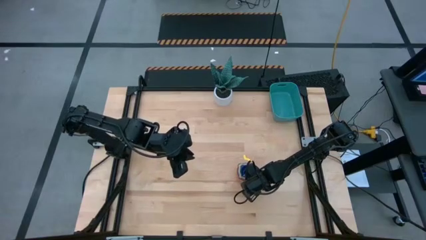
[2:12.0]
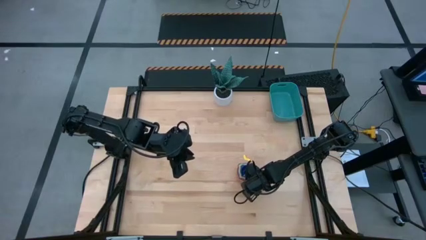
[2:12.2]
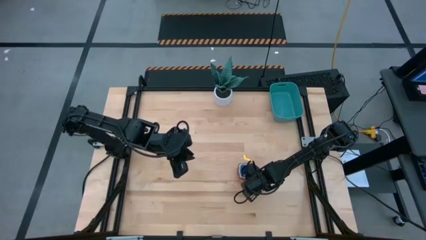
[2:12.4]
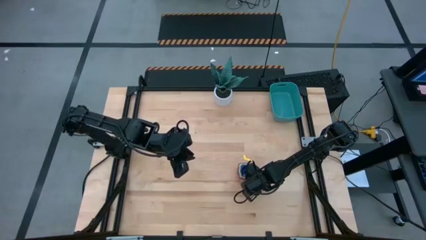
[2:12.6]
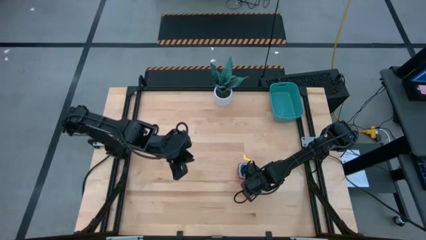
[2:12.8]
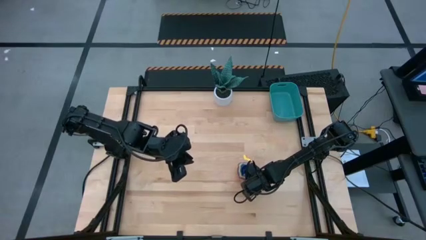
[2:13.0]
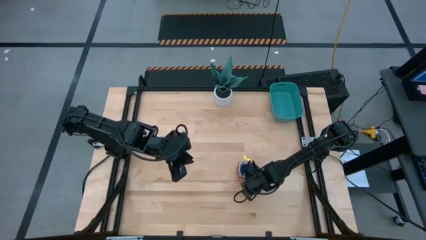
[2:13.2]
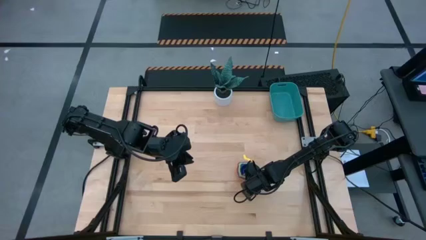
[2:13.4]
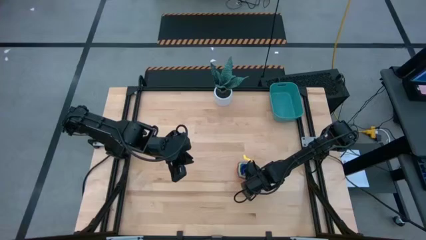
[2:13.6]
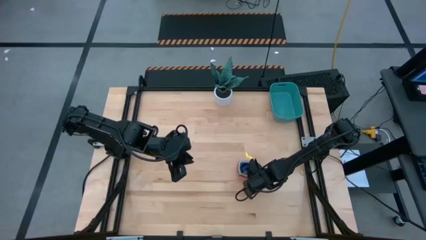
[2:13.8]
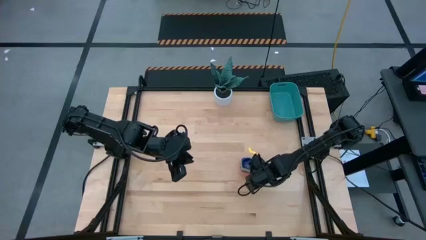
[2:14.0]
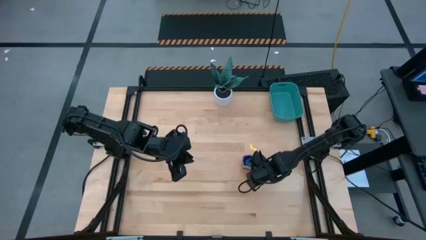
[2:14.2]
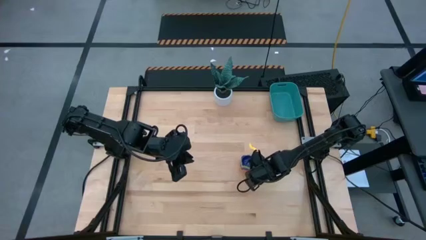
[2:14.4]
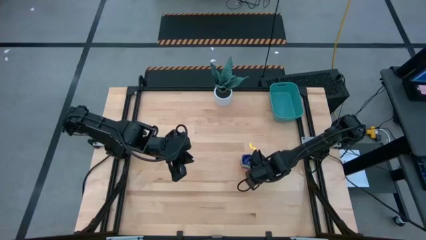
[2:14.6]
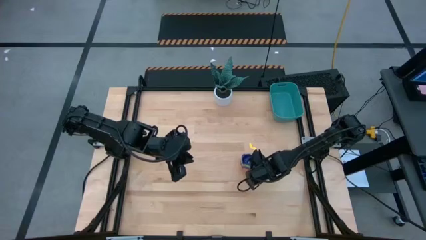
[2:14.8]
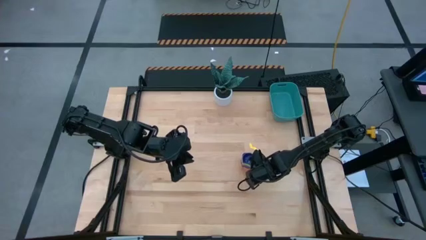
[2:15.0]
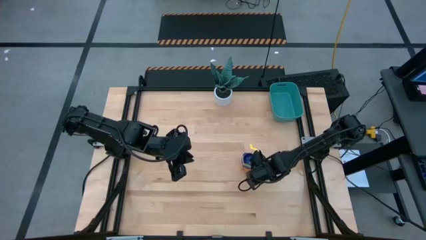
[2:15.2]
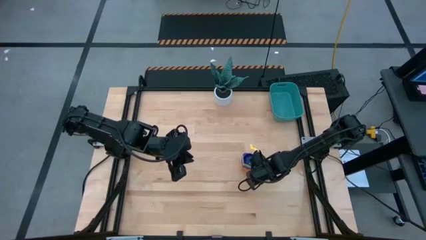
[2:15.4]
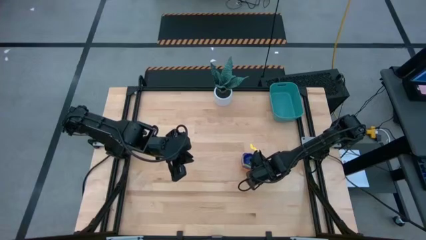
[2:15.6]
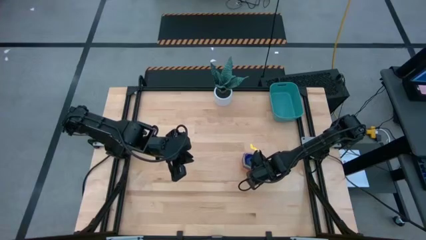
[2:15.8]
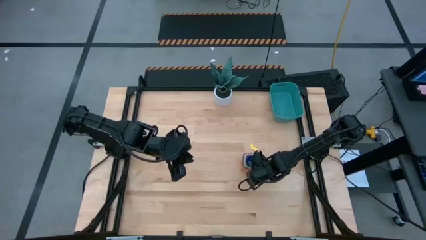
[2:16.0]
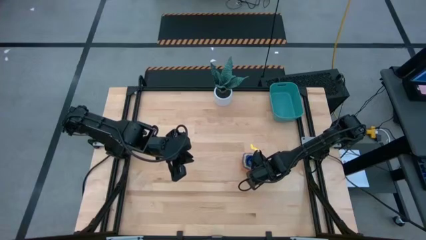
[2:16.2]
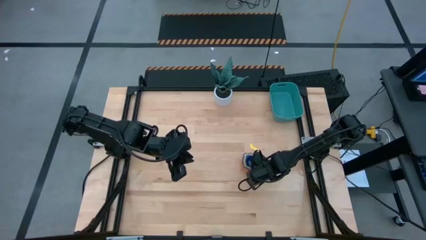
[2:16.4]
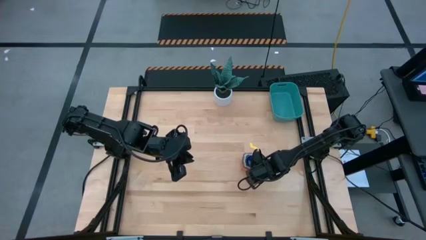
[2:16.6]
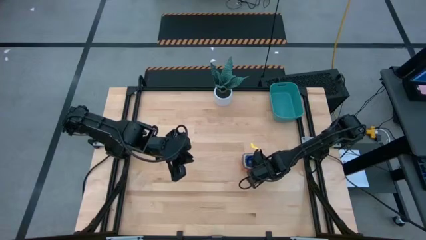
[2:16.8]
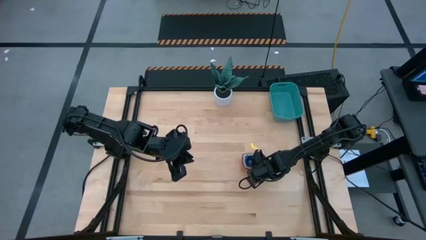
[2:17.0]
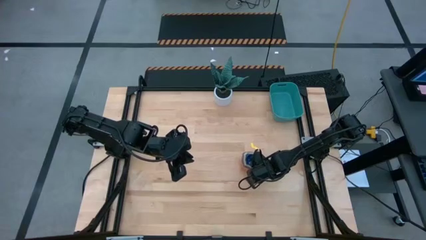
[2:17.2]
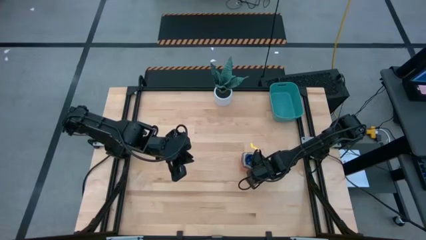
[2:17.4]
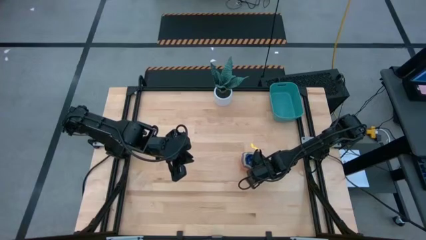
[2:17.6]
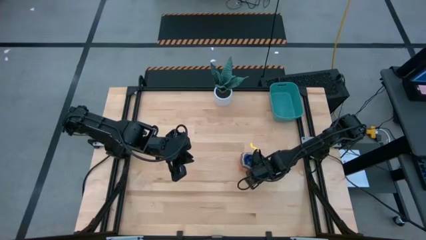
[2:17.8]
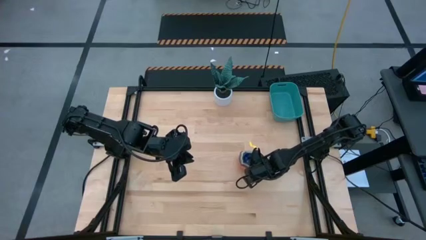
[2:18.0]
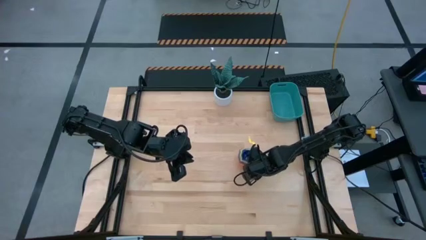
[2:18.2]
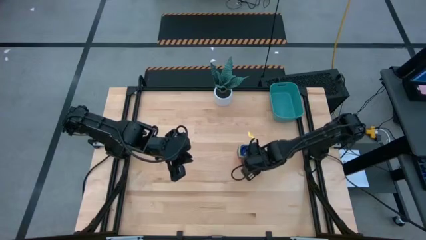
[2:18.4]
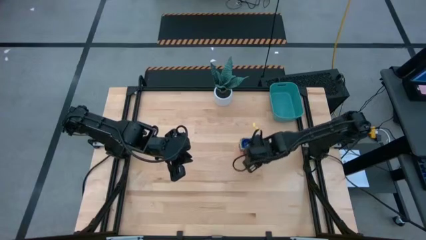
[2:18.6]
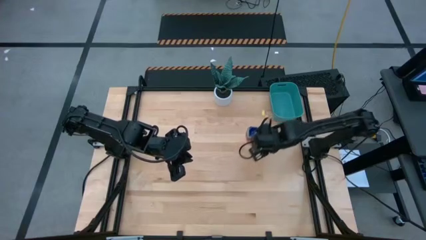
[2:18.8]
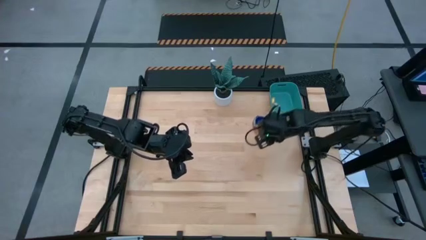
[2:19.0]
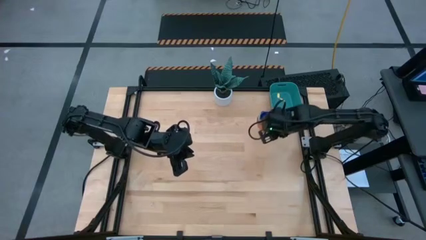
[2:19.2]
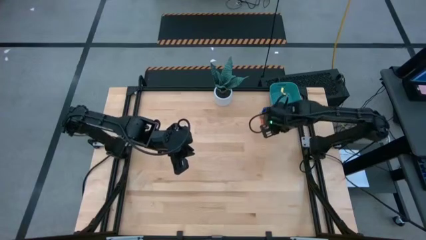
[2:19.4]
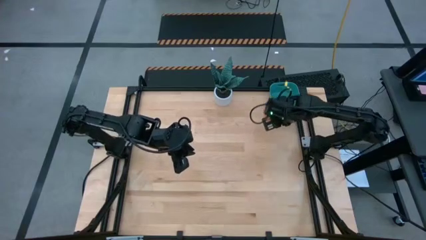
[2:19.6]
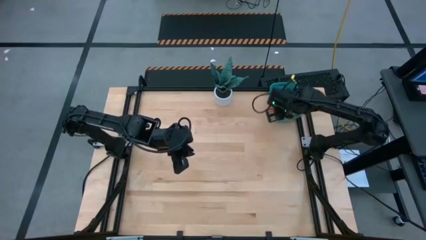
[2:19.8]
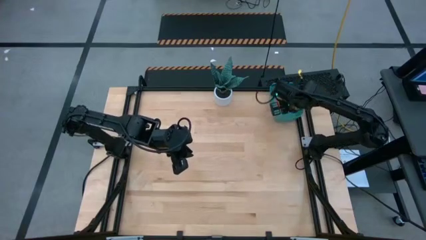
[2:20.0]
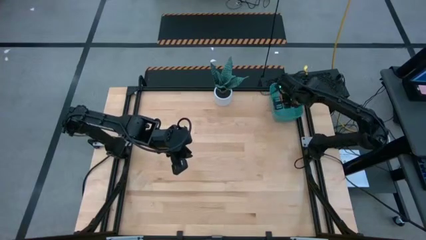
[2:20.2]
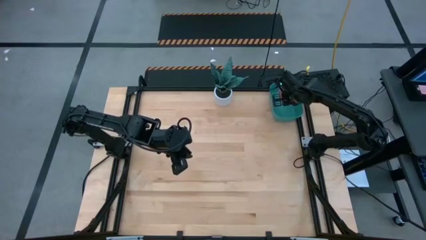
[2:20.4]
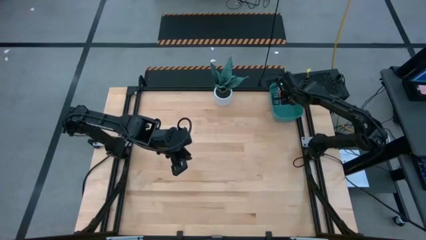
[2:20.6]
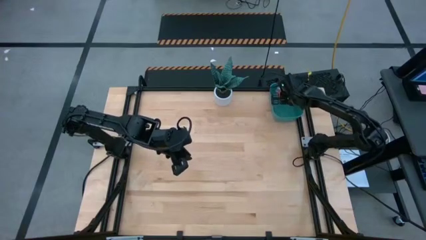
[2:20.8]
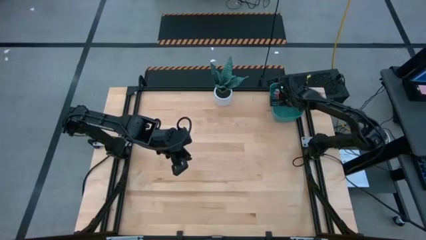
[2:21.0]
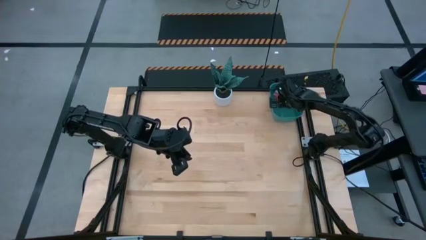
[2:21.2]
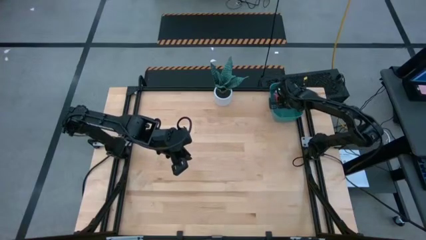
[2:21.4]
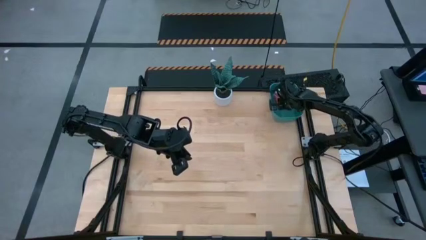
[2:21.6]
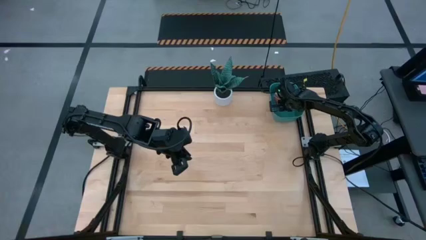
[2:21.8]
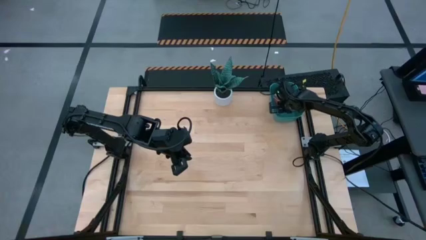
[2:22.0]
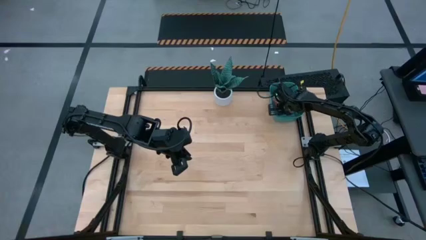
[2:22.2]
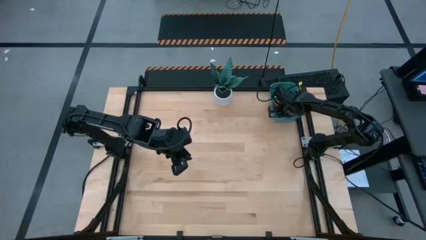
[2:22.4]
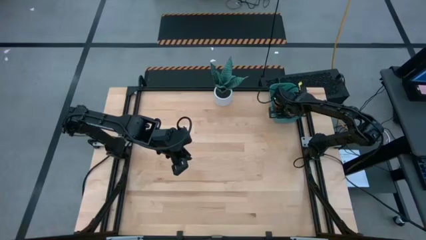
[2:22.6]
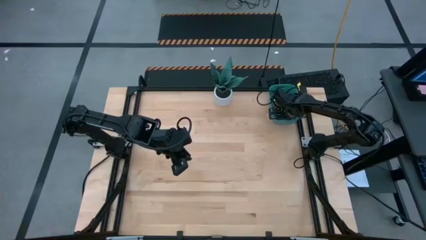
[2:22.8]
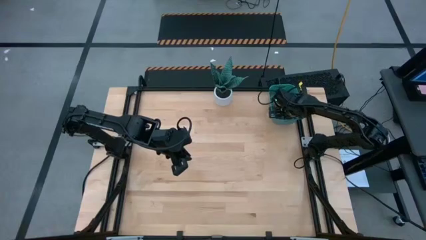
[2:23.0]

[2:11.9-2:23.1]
Task: Nest measuring cups in basket
Put the nested measuring cups into the green bin

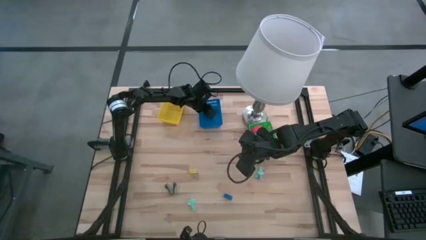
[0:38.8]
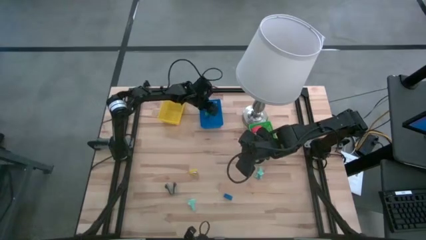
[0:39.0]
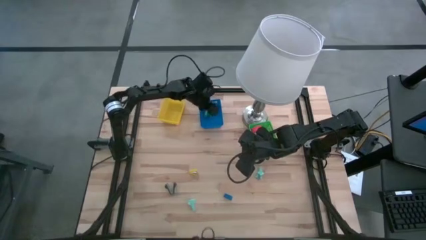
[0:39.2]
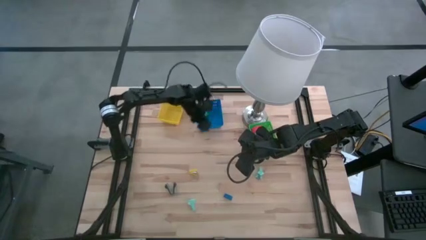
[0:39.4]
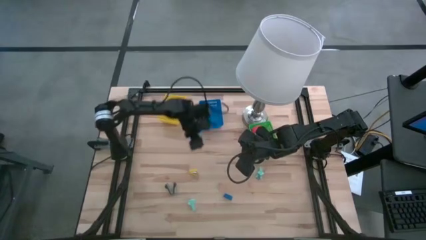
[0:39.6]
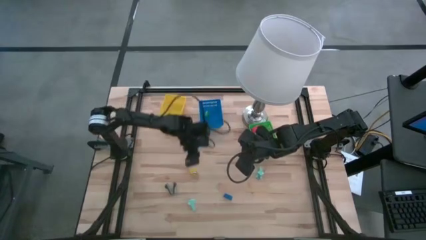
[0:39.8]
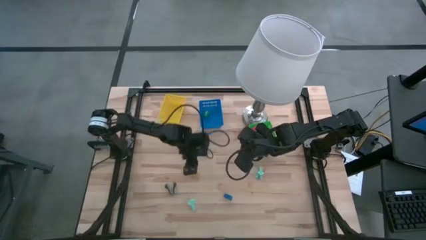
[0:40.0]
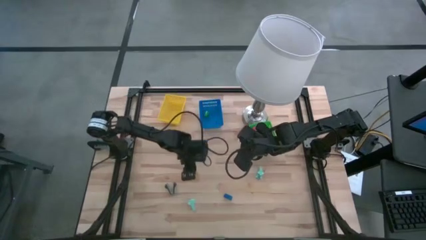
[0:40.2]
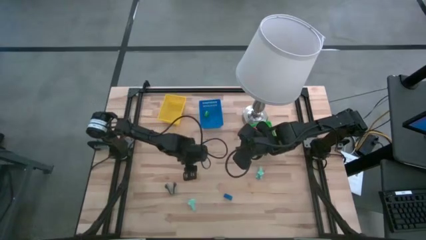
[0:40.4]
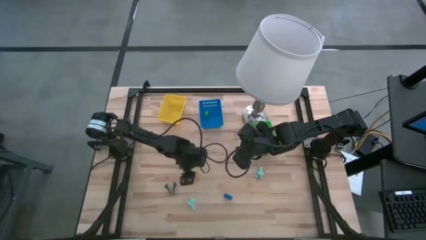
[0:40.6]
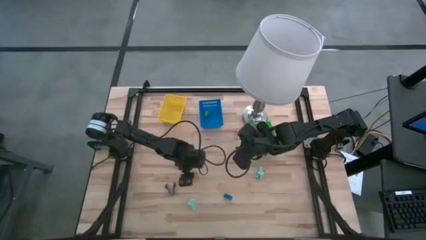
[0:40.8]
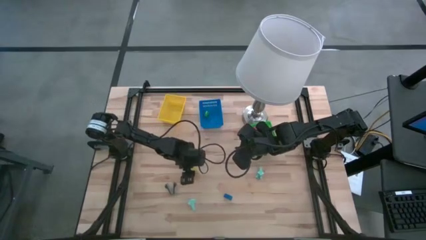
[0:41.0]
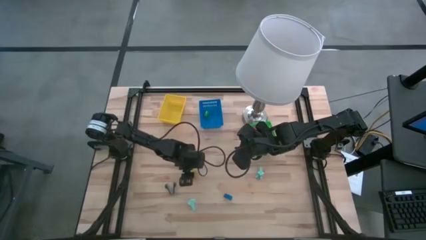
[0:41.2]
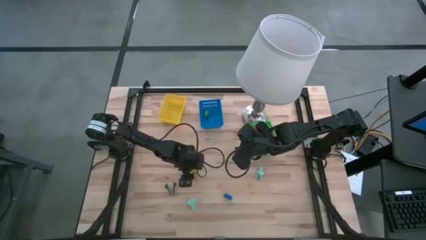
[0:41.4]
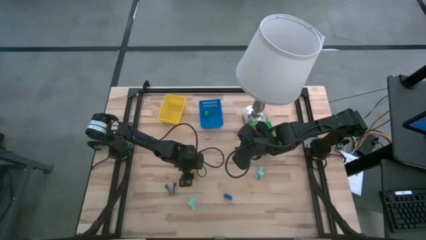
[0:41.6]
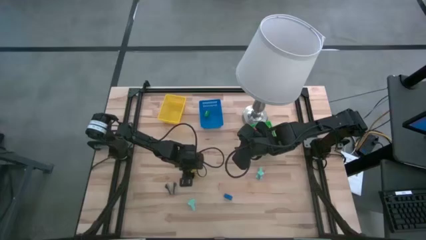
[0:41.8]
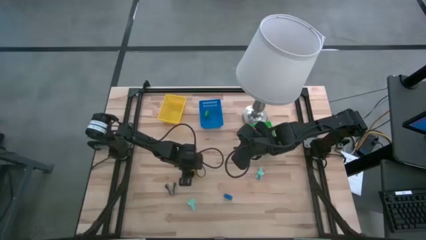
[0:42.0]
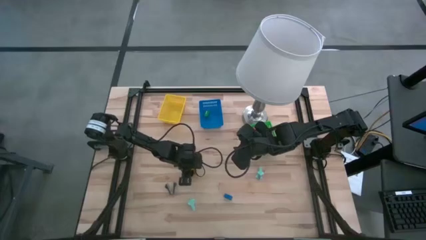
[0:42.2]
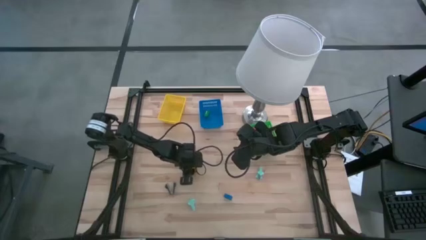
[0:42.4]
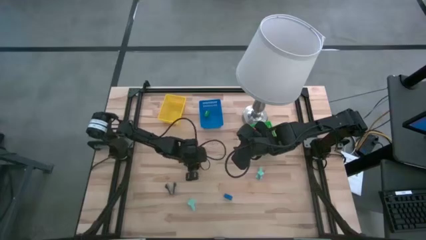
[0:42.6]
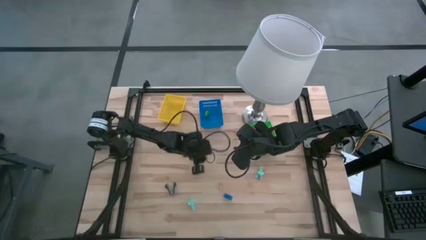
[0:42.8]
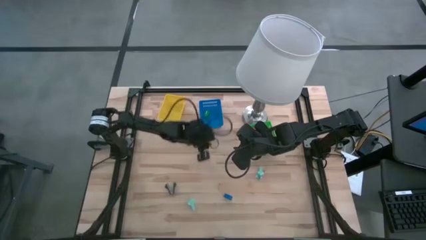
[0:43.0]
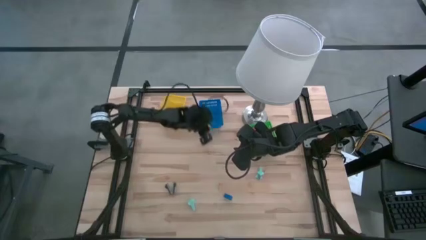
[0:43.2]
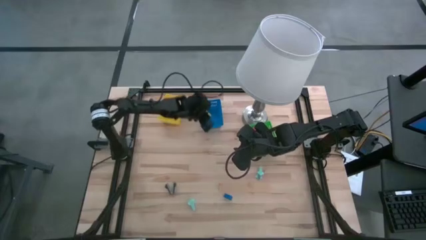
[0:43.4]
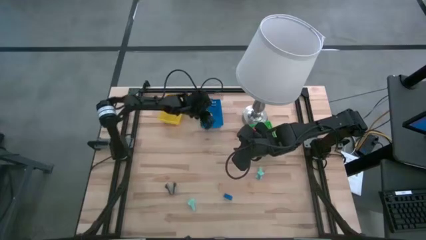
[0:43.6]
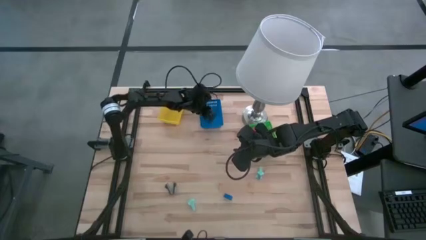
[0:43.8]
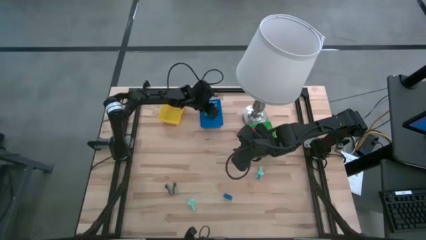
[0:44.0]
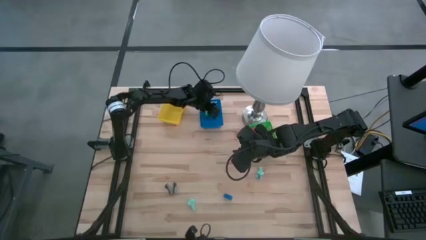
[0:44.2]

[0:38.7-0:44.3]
Task: Pick and place Stapler, Stapler remover, tape
Put the yellow small stapler into the blue bin
